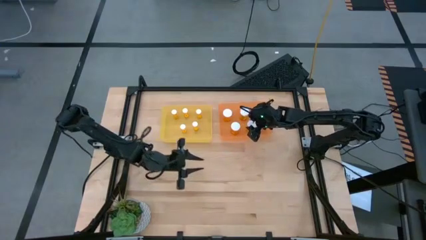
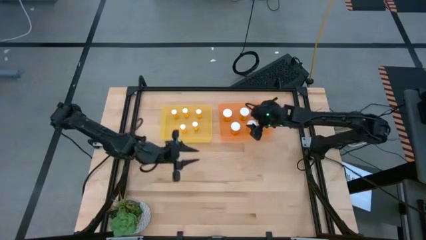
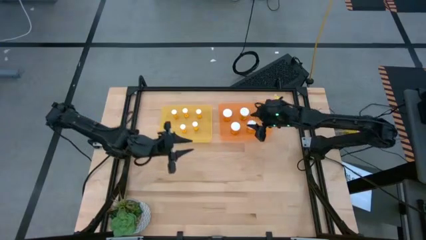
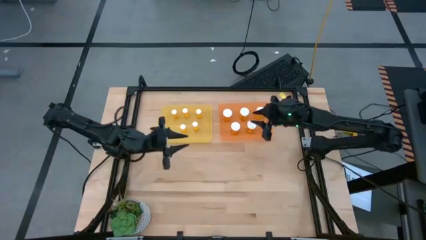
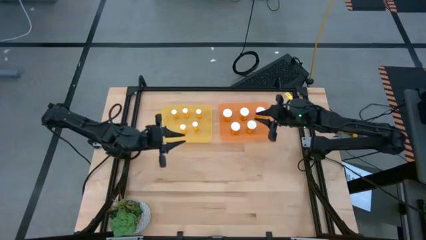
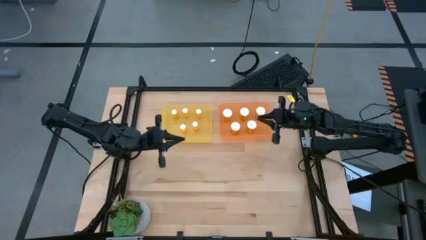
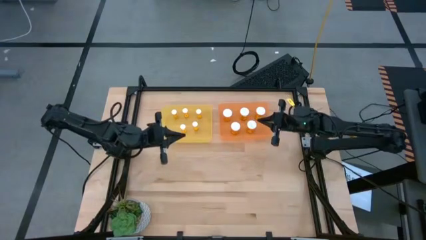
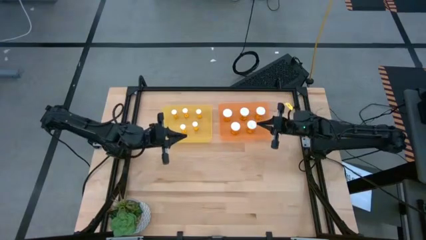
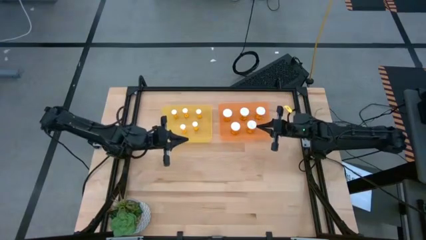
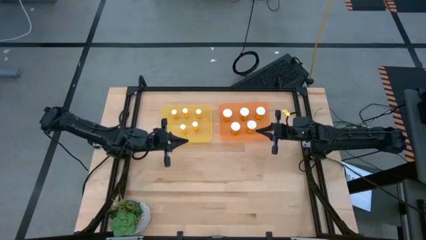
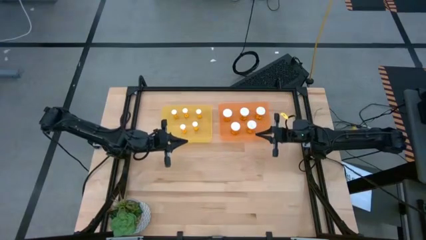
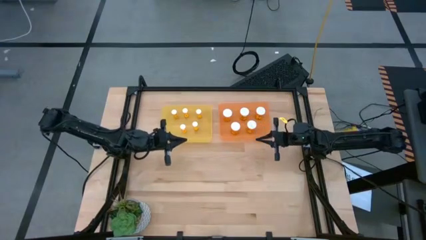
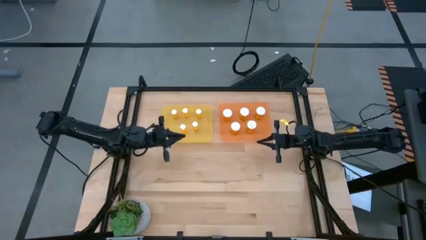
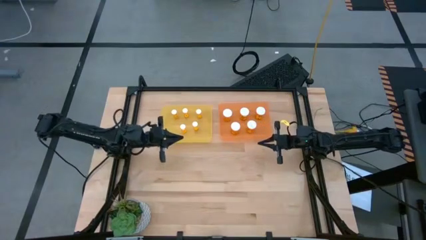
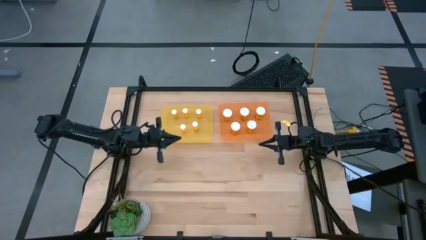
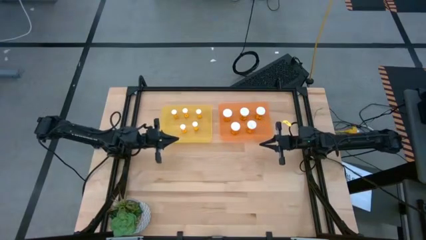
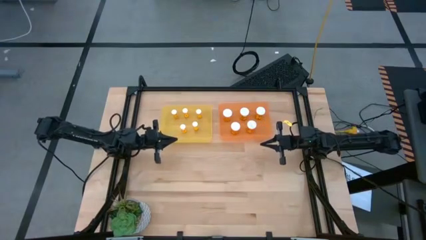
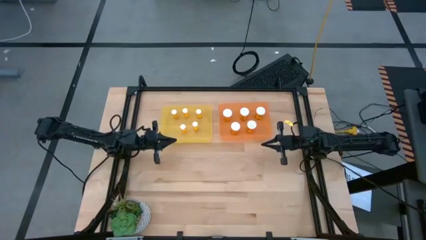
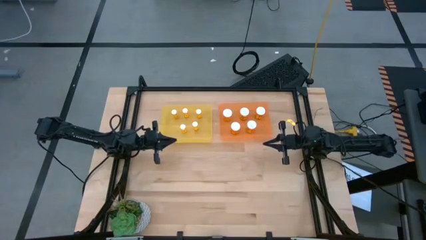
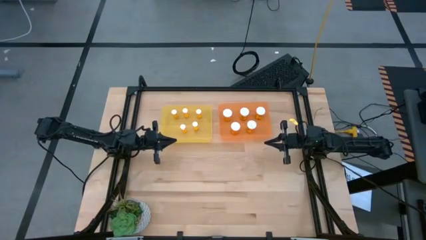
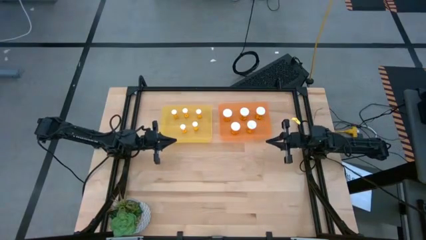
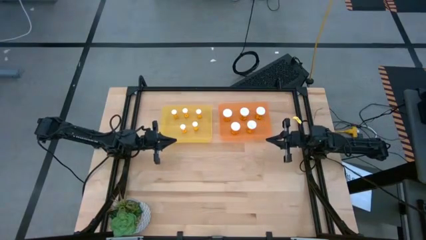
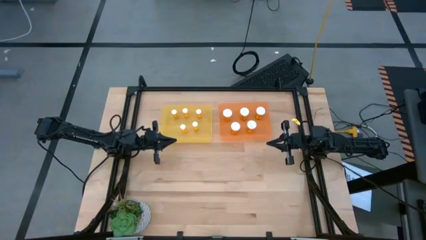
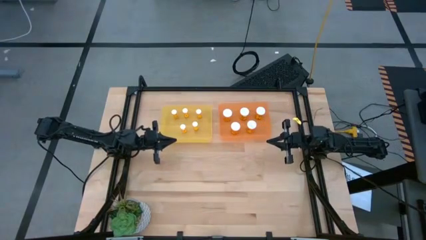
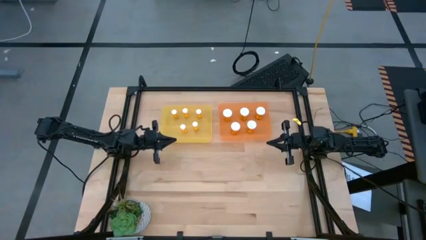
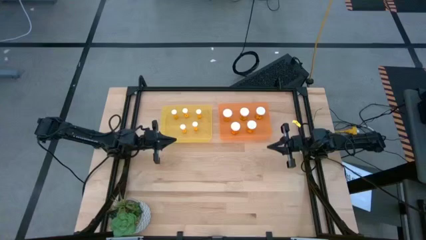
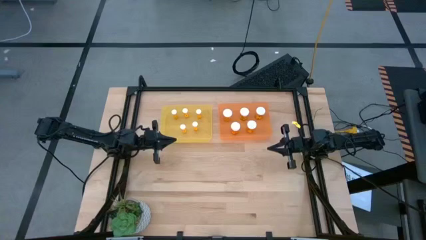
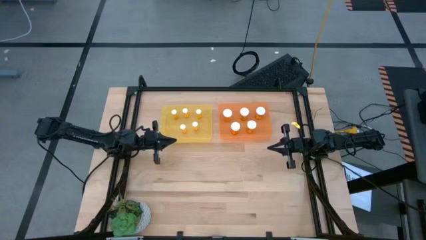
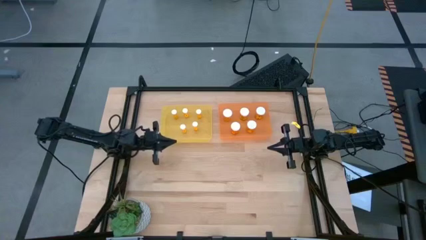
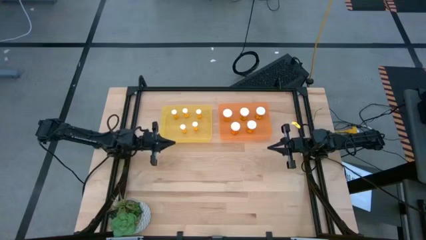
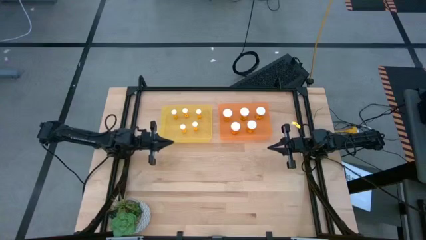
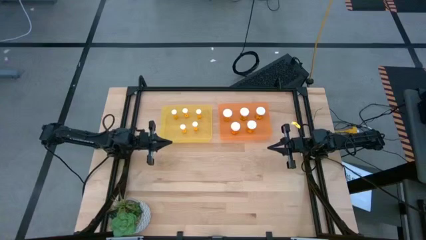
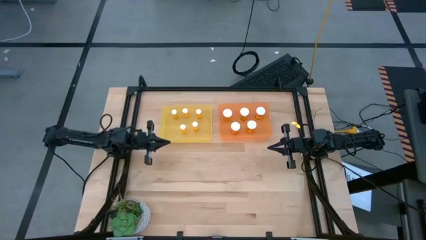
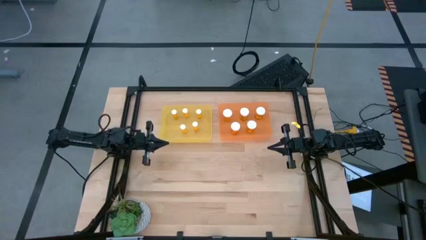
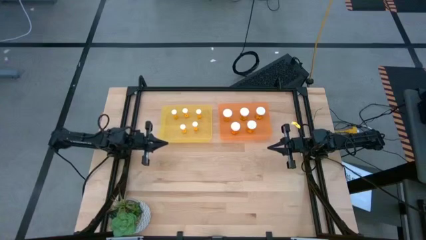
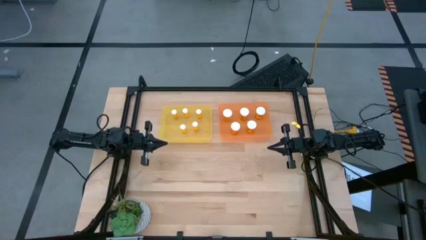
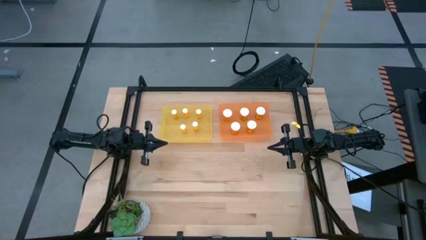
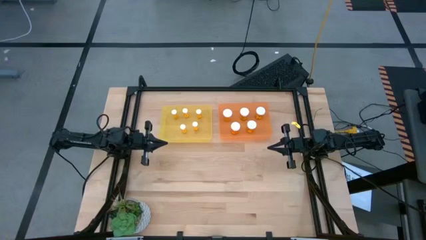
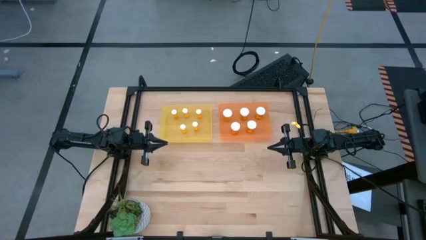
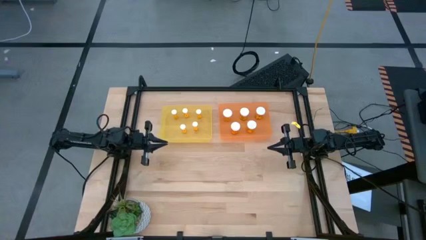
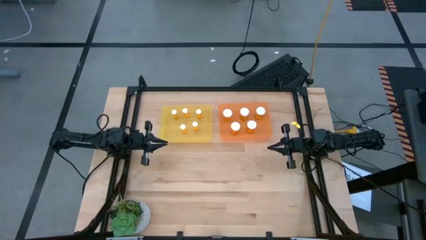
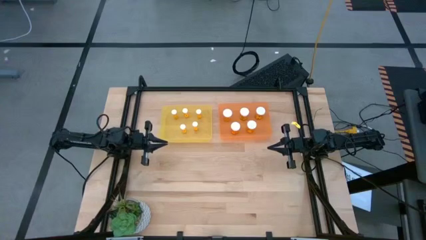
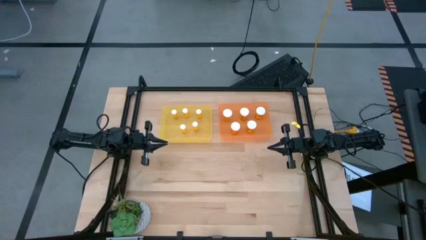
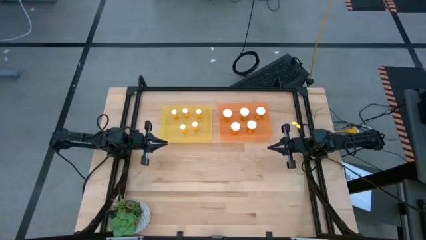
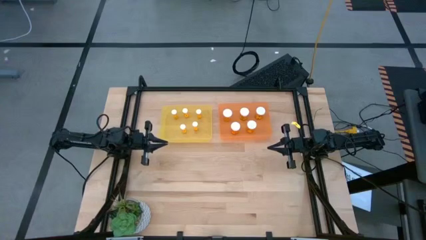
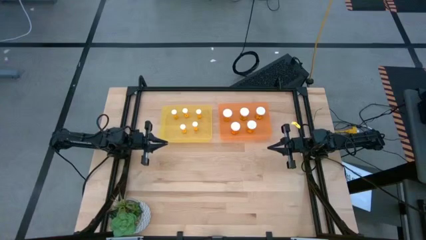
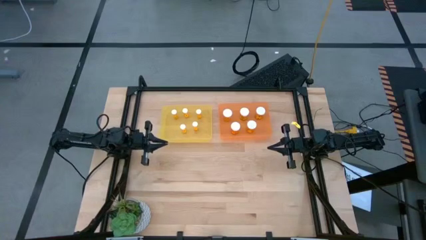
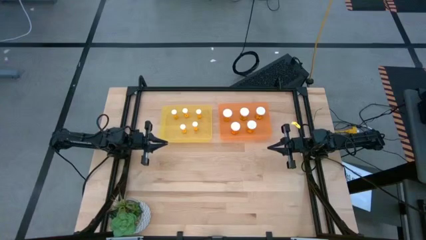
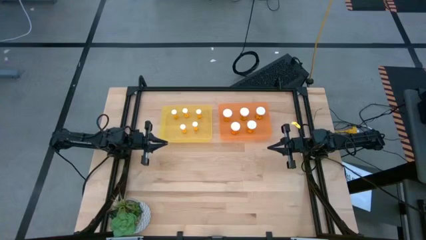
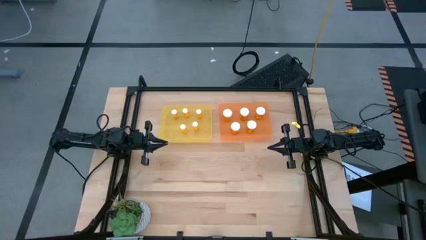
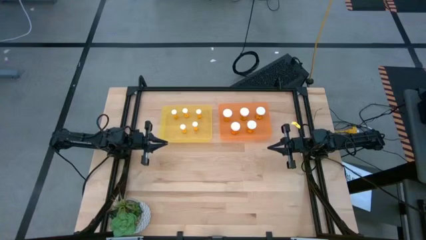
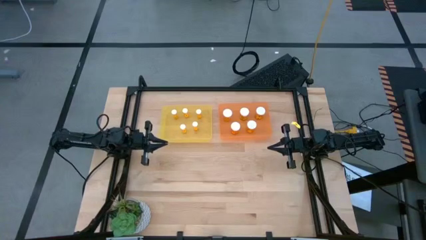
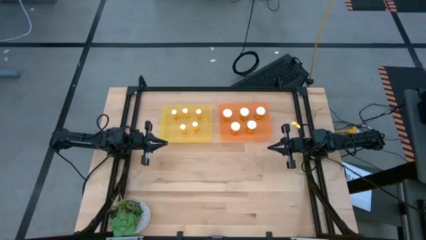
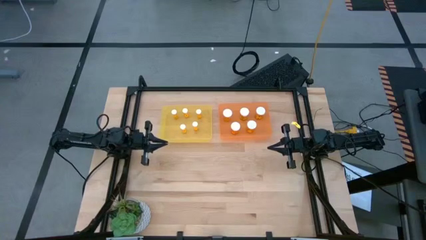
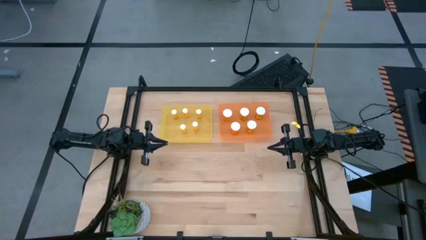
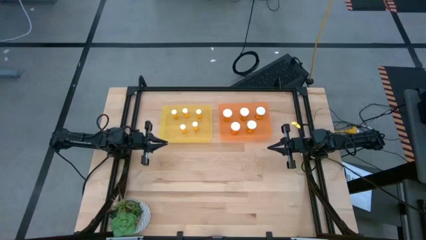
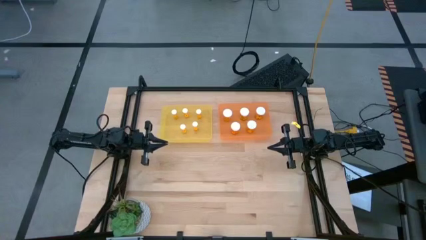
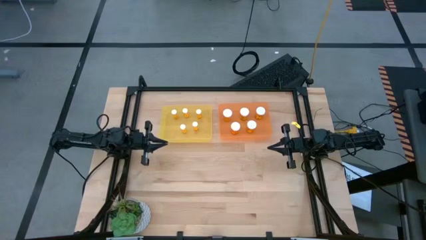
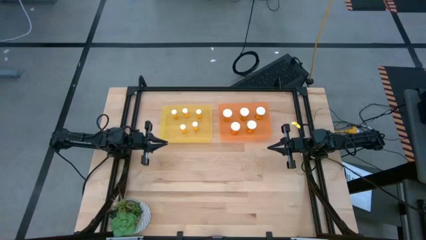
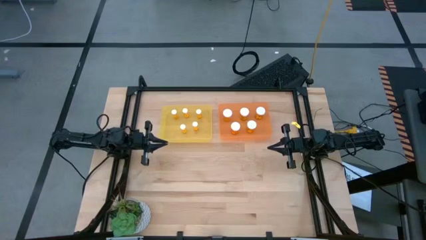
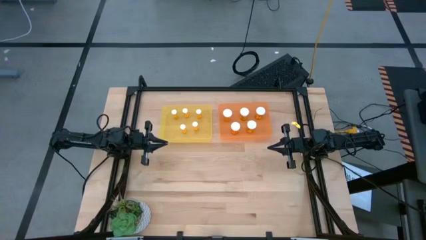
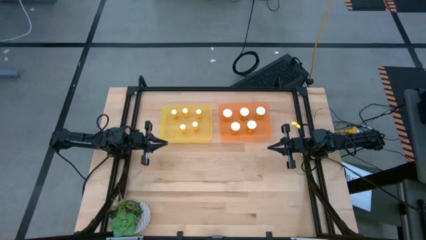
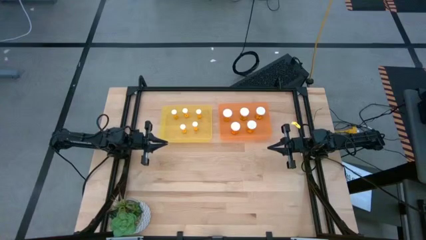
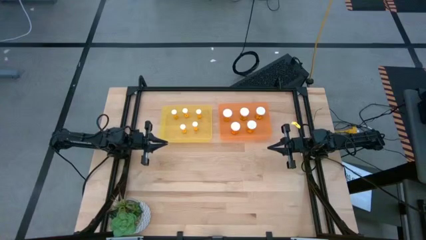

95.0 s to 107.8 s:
Task: Pick and place medicine bottles into bin by pill shape (circle, oval)
Return to Home Position
